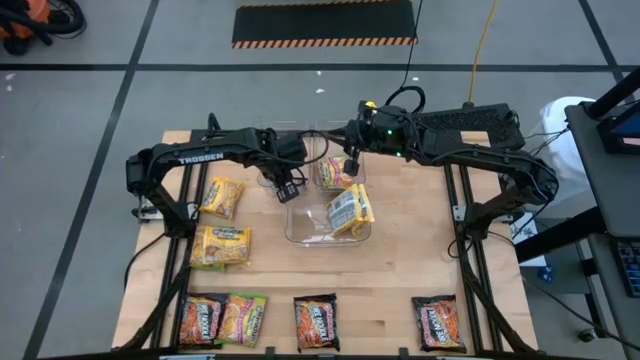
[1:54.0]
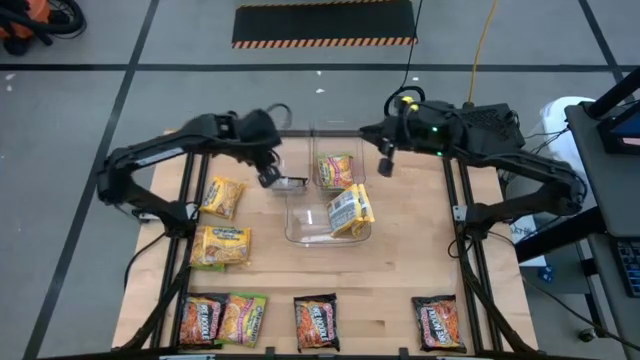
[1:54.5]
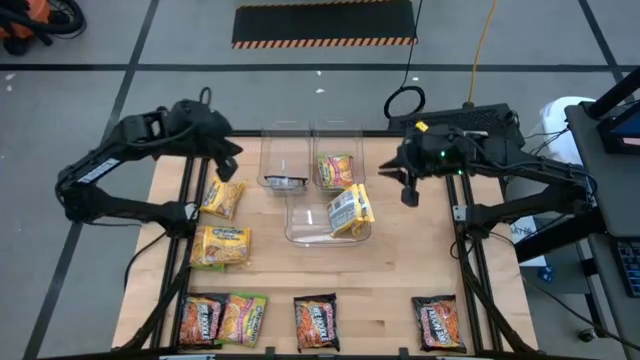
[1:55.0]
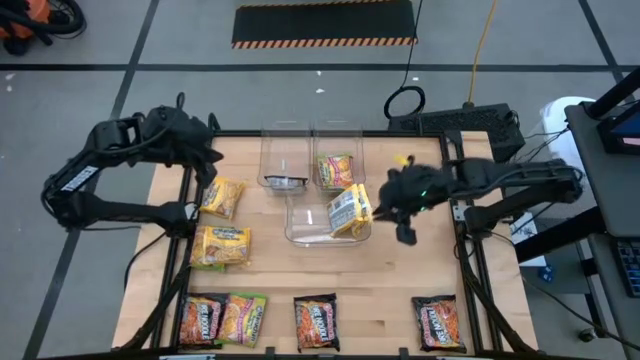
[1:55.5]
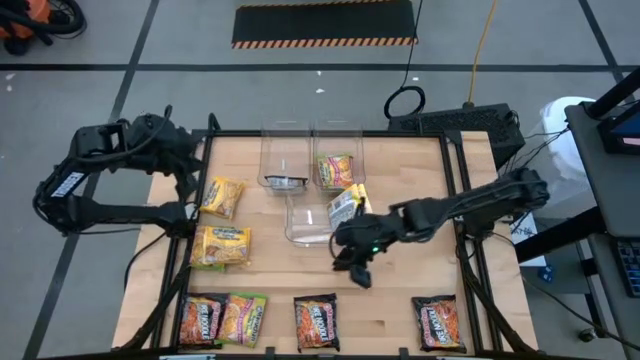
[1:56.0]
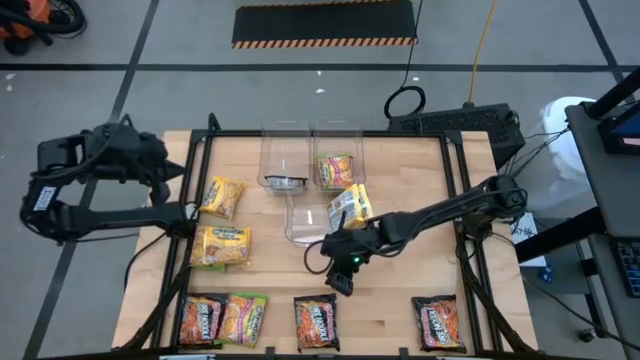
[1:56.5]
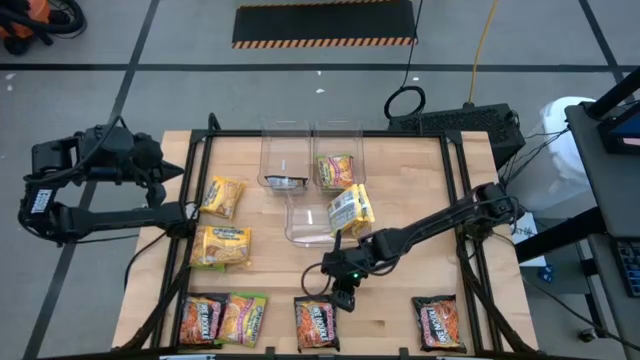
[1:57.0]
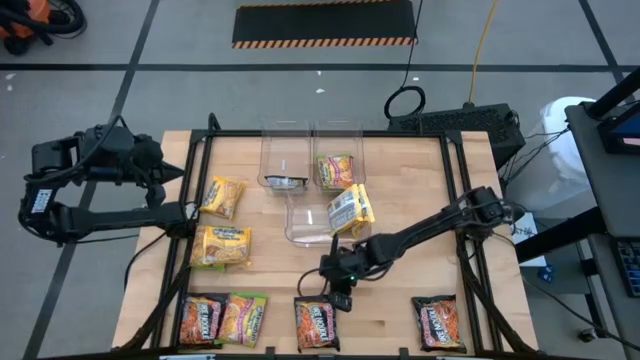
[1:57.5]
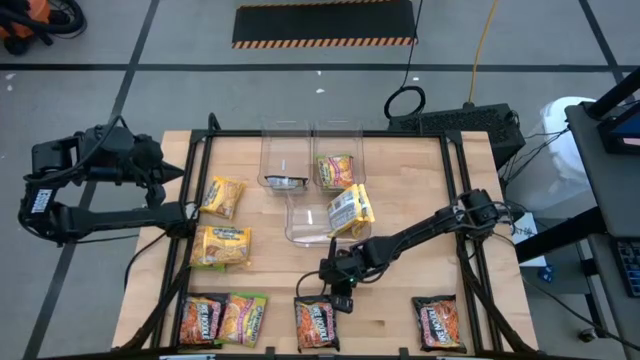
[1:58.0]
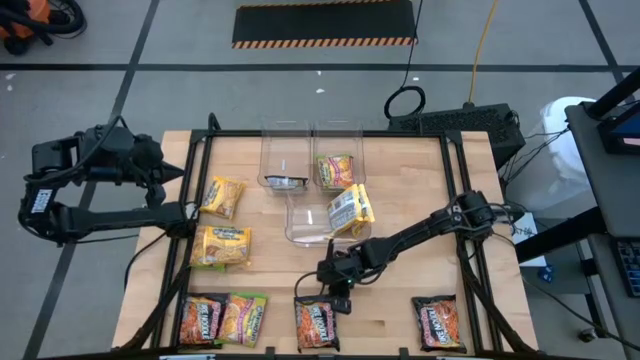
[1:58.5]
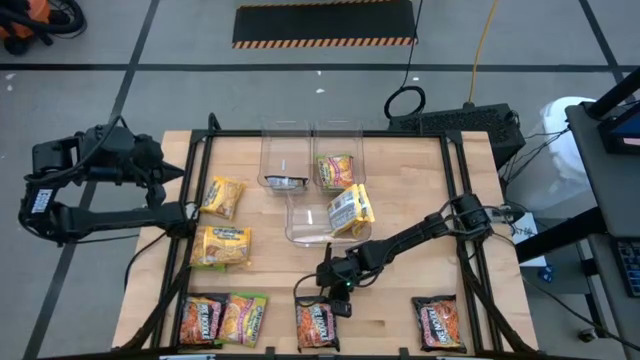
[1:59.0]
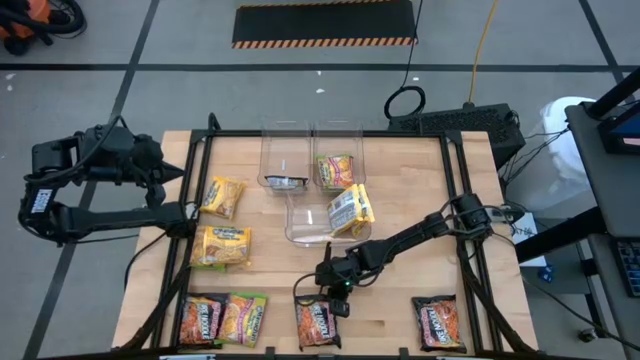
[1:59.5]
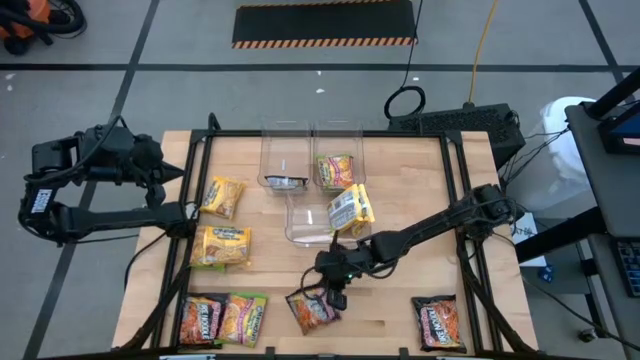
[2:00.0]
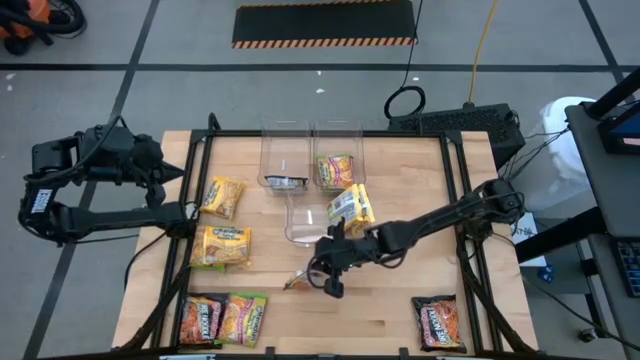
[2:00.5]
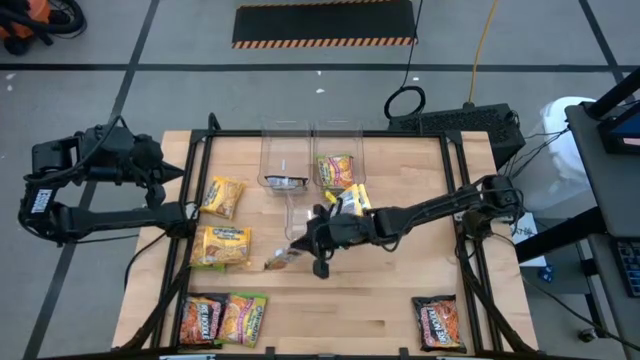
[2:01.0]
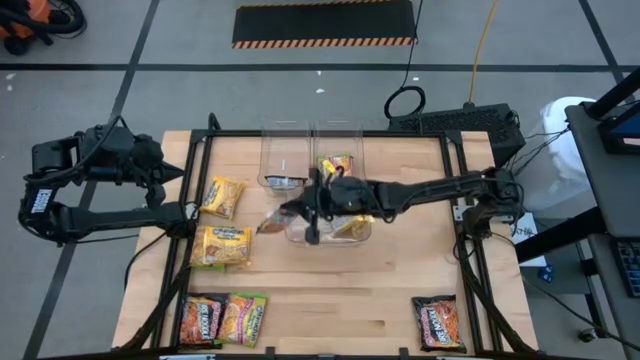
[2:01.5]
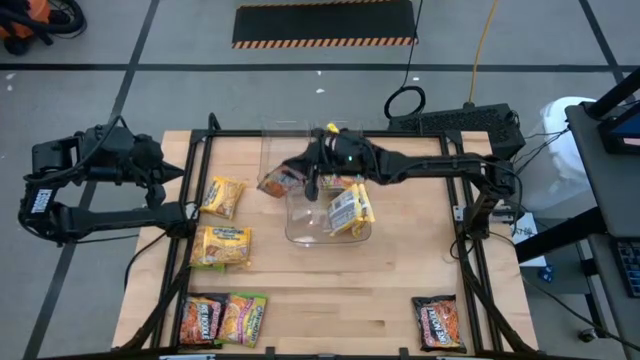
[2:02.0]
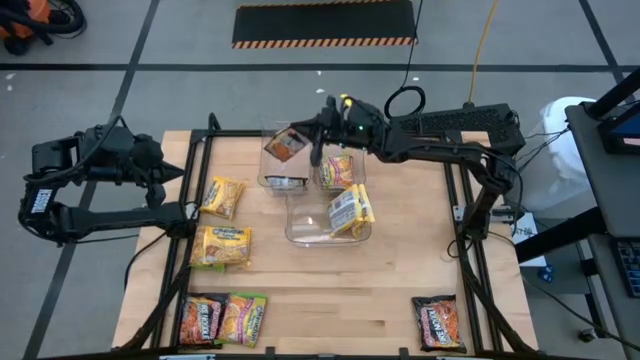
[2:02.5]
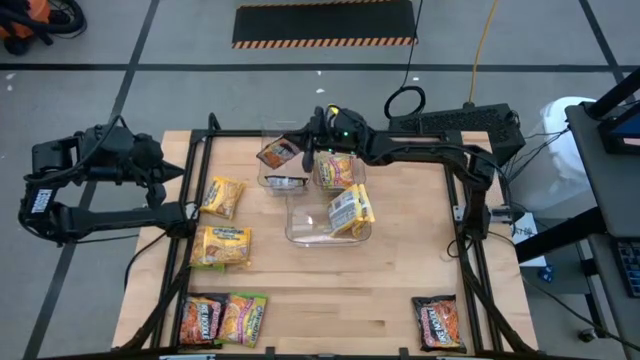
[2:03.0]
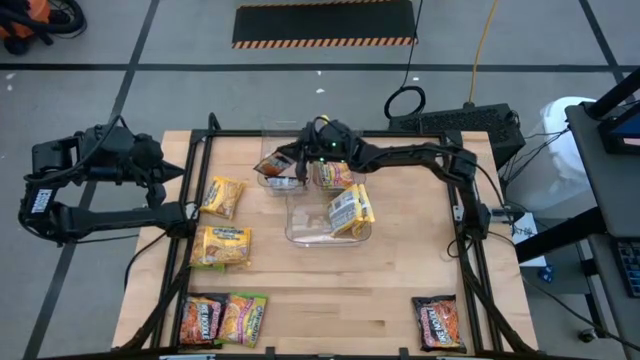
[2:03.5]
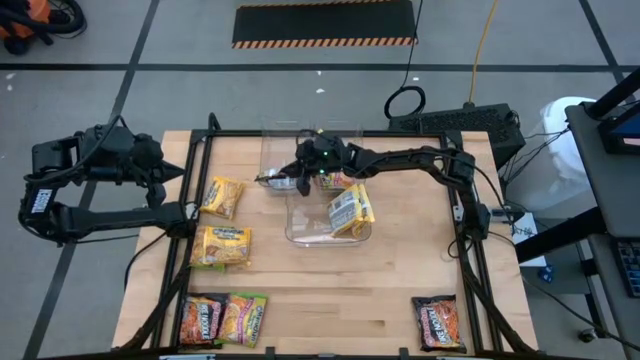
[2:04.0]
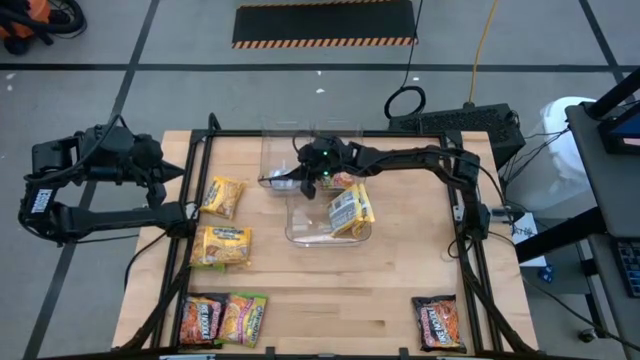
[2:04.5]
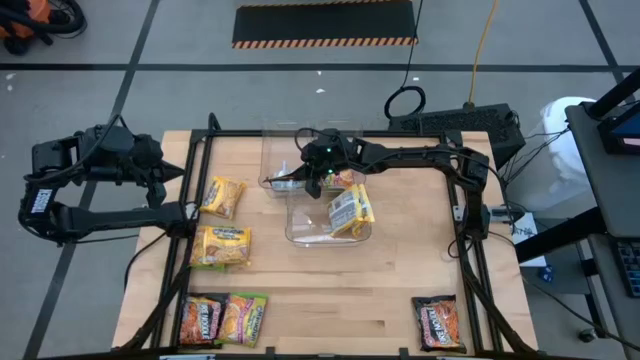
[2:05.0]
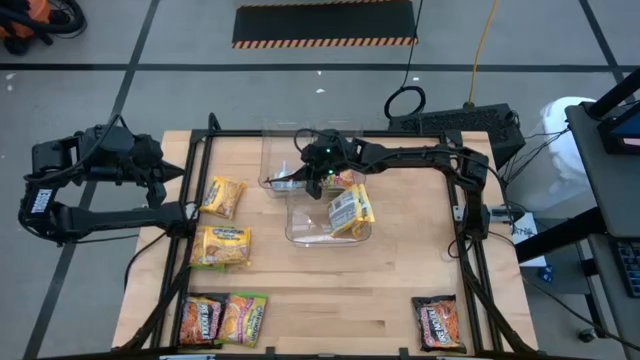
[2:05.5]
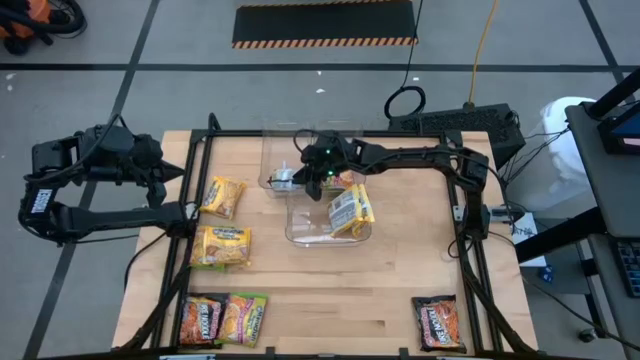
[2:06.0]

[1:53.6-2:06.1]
Task: Sort Maruchan noodles
Put the black noodle pack into the top left transparent bin
